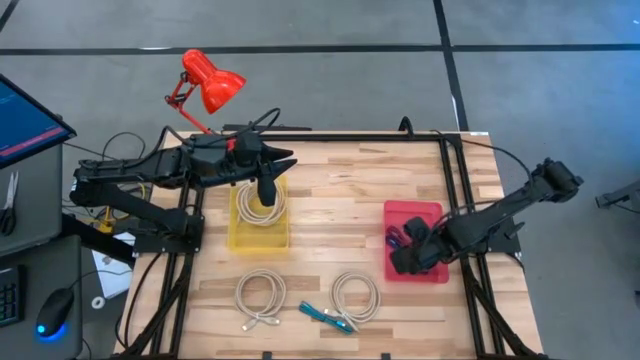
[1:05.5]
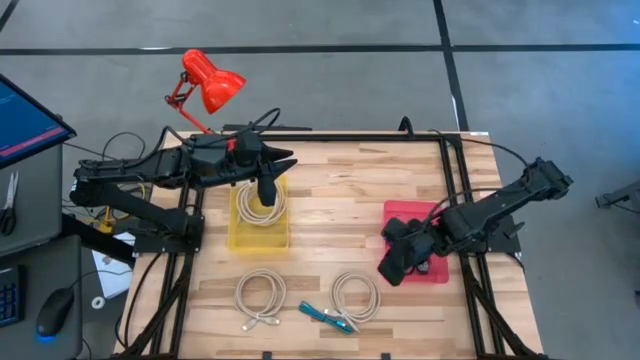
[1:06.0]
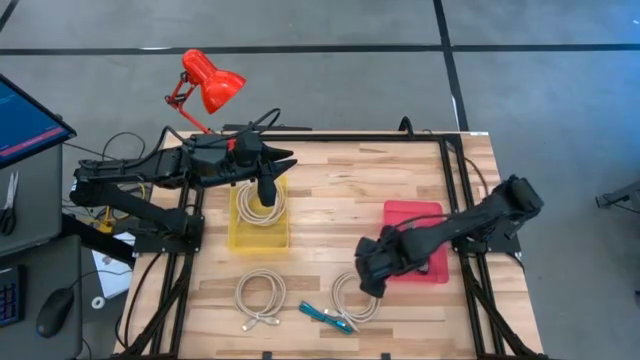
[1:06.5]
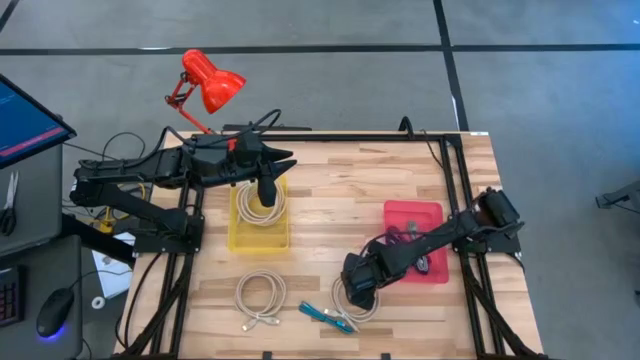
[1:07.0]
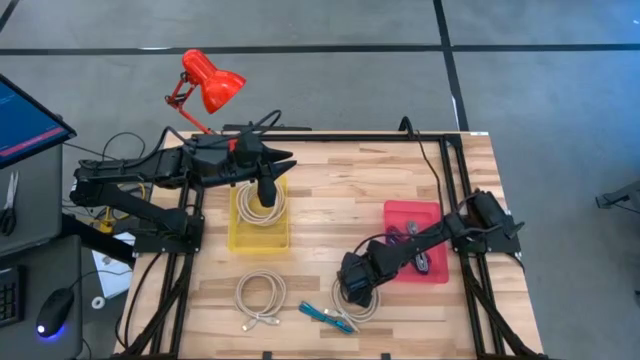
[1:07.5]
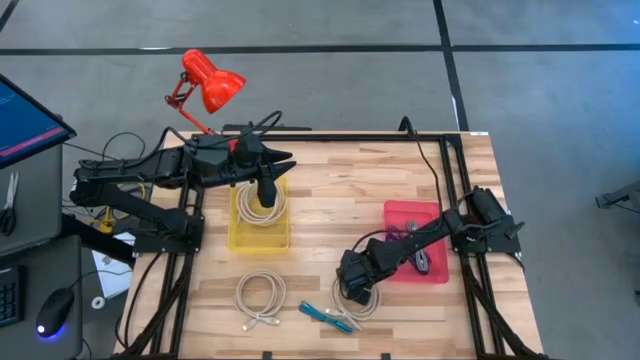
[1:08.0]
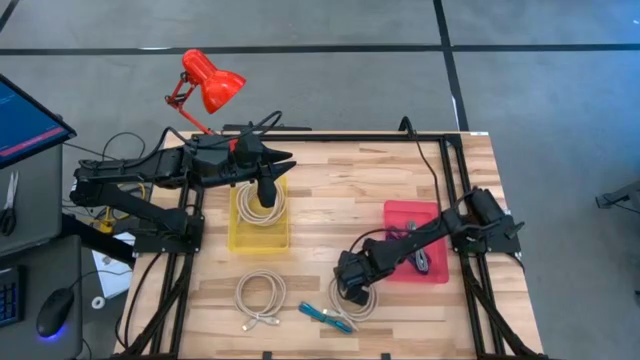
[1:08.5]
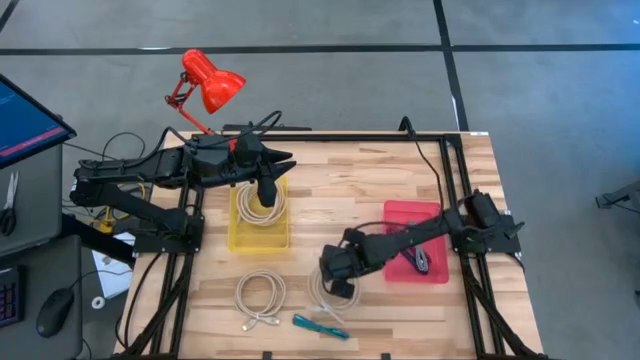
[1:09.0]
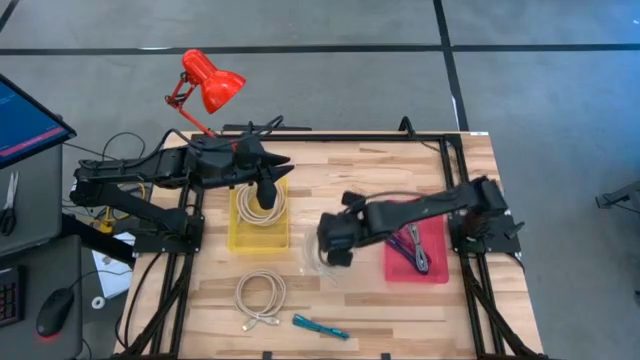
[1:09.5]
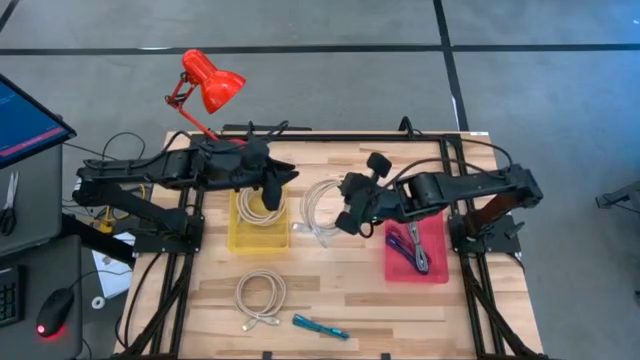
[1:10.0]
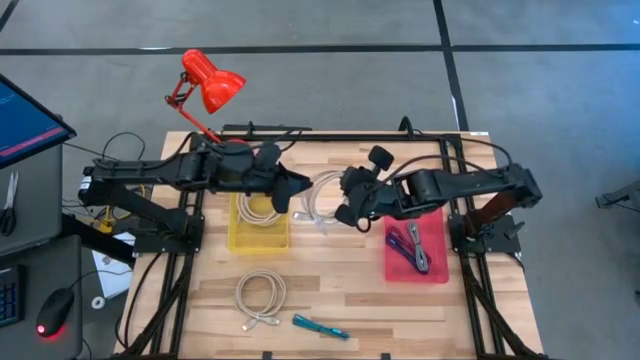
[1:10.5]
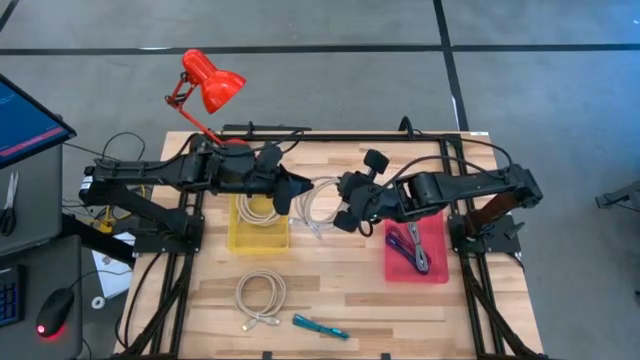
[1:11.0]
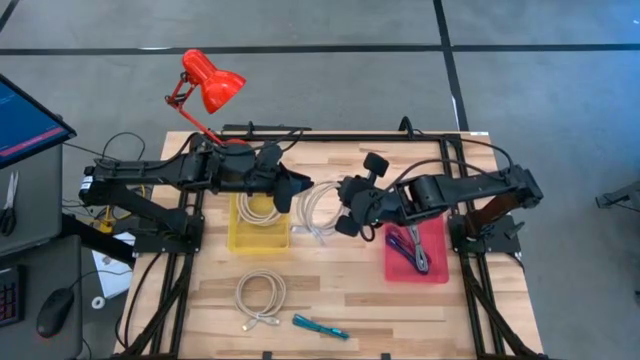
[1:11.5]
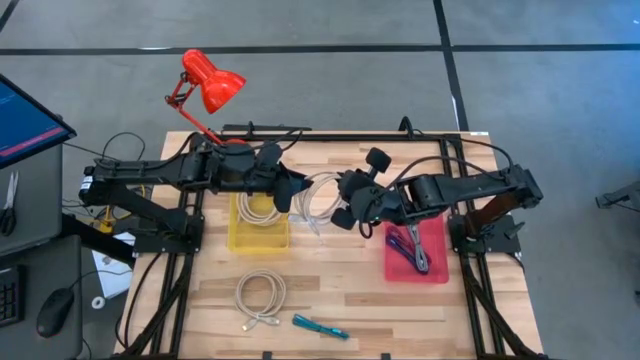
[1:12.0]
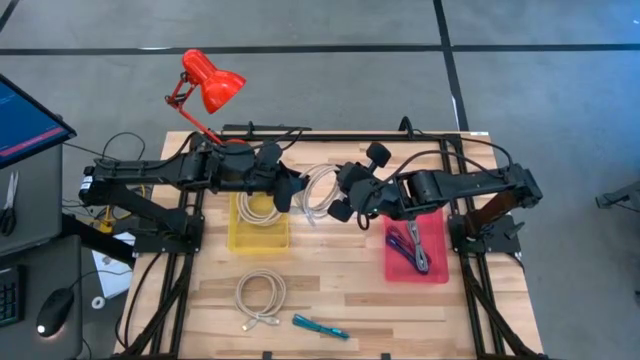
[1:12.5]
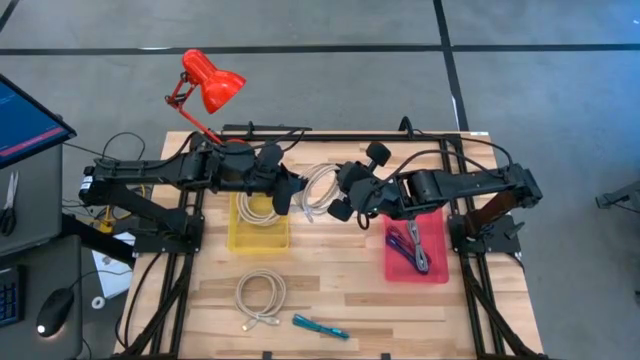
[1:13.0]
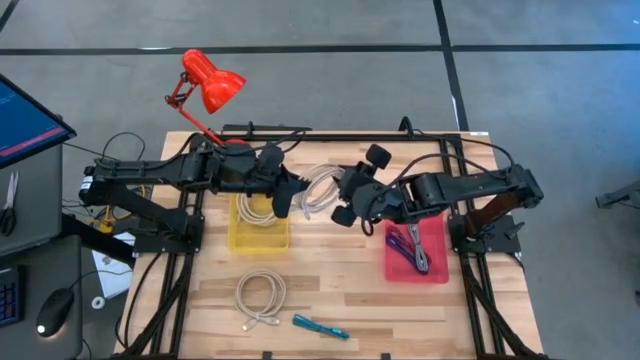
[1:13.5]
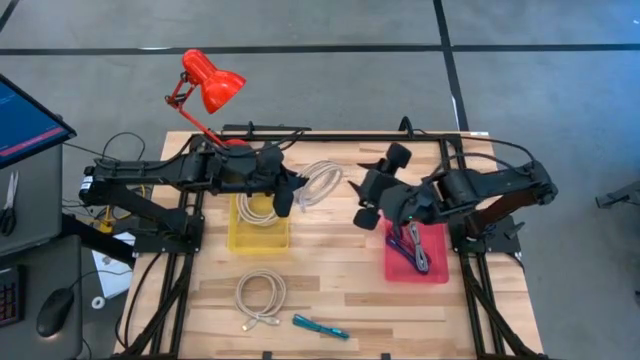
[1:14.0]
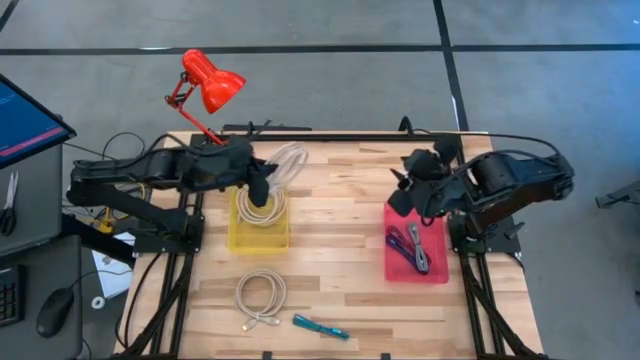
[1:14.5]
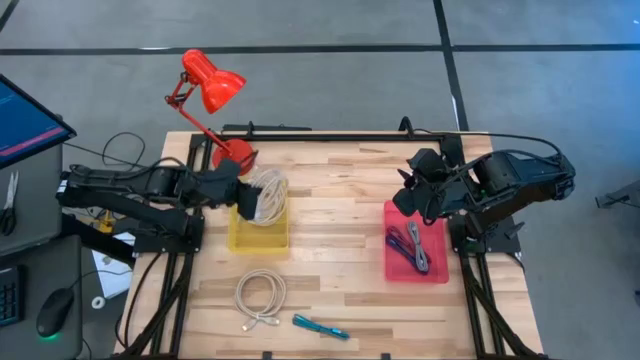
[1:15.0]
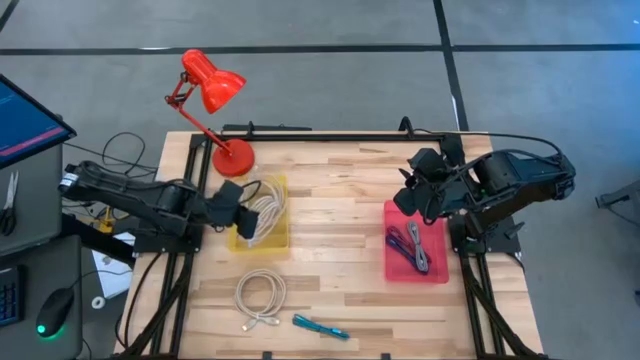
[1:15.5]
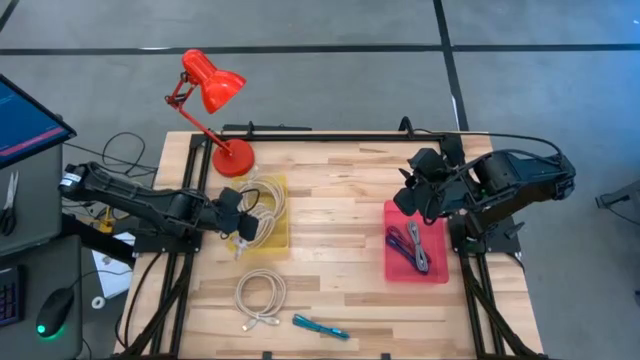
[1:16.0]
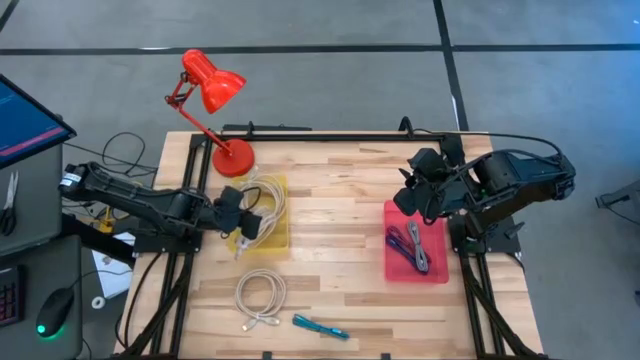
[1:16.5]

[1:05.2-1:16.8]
Task: Pick & Place USB Port
Put the brown HDMI cable into the yellow bin

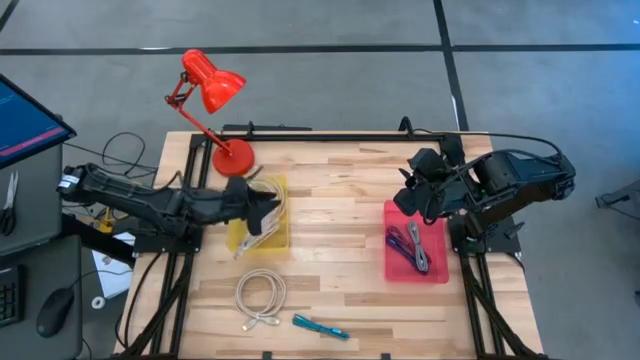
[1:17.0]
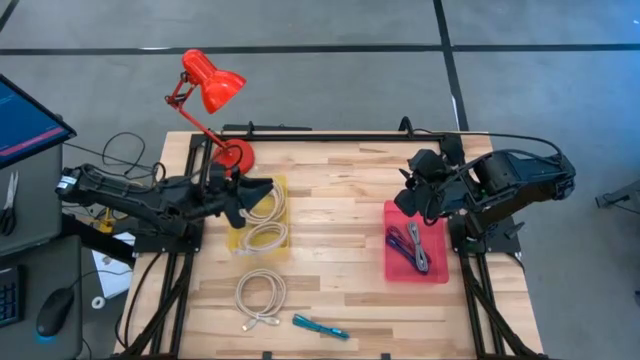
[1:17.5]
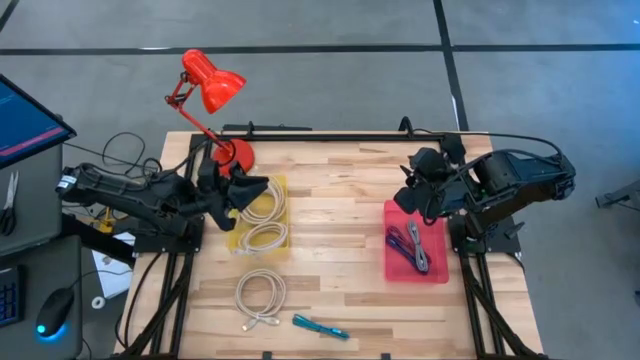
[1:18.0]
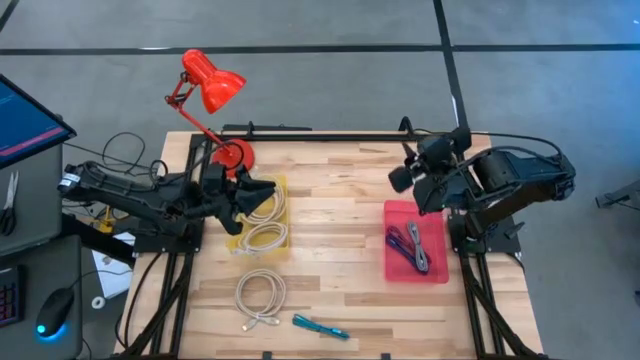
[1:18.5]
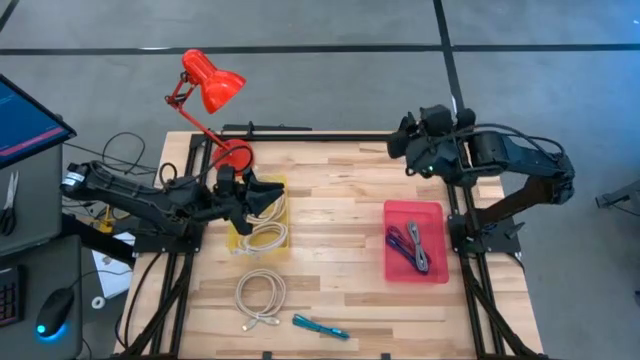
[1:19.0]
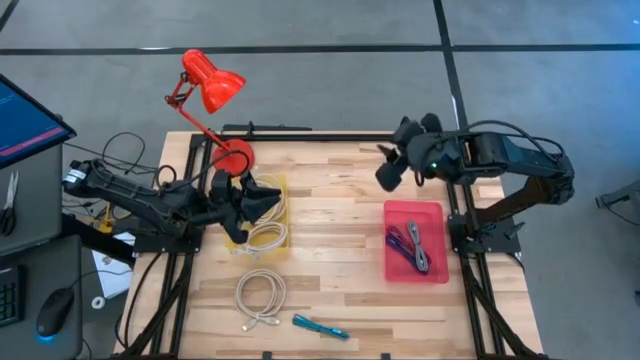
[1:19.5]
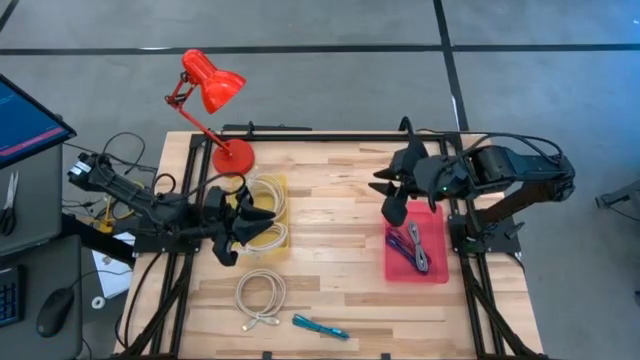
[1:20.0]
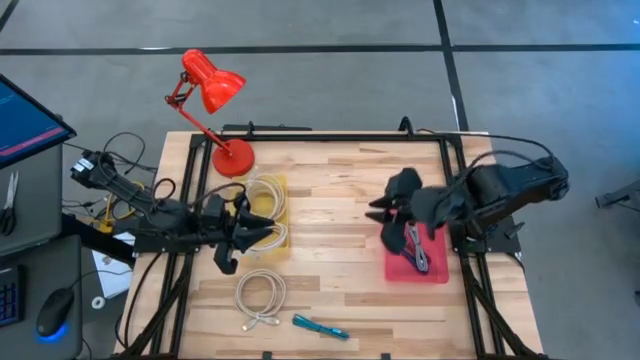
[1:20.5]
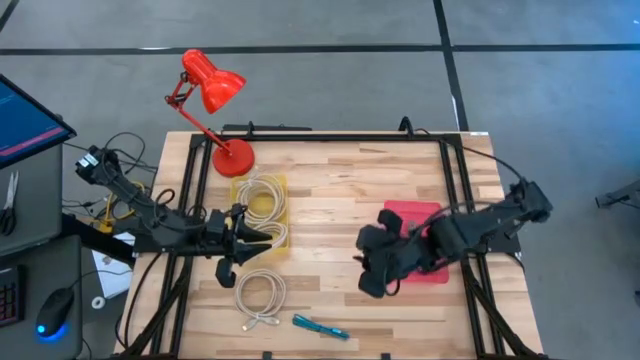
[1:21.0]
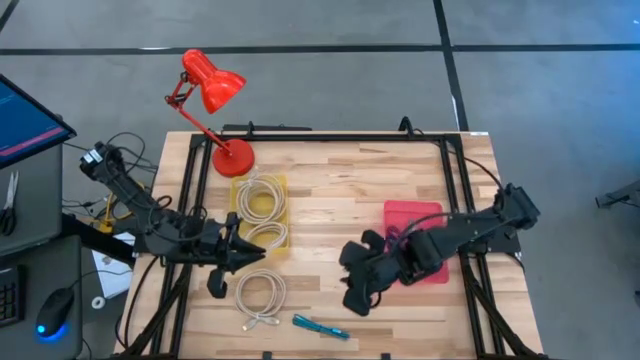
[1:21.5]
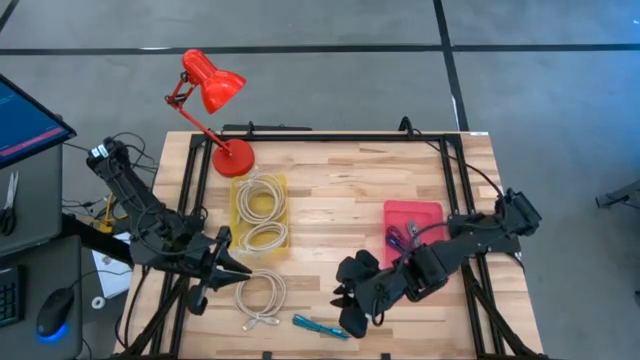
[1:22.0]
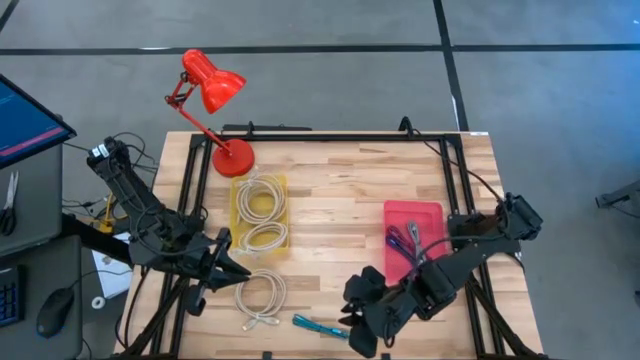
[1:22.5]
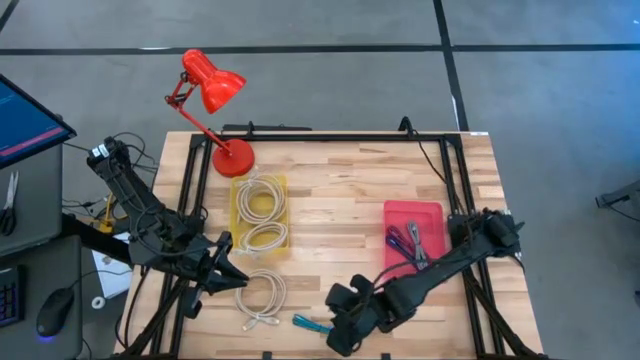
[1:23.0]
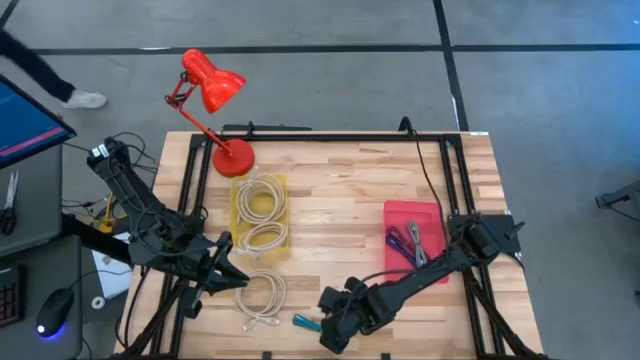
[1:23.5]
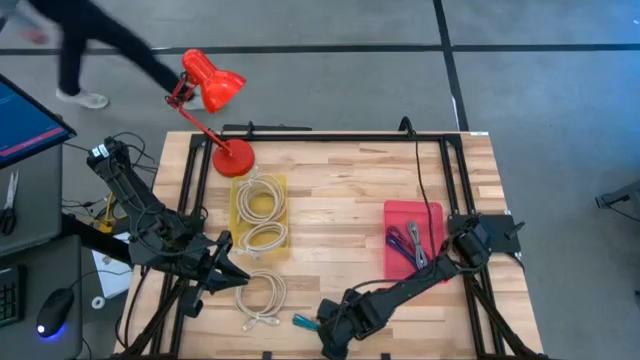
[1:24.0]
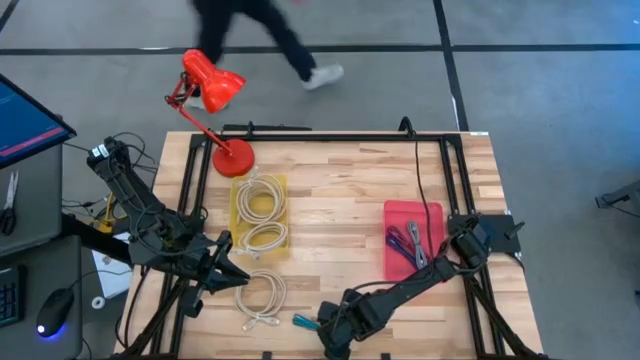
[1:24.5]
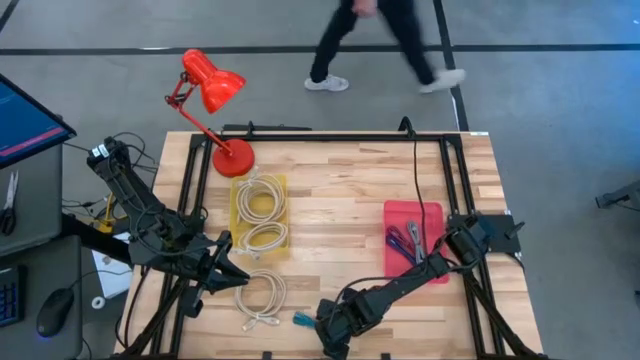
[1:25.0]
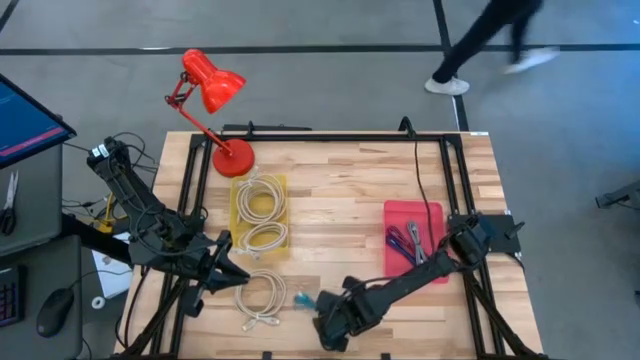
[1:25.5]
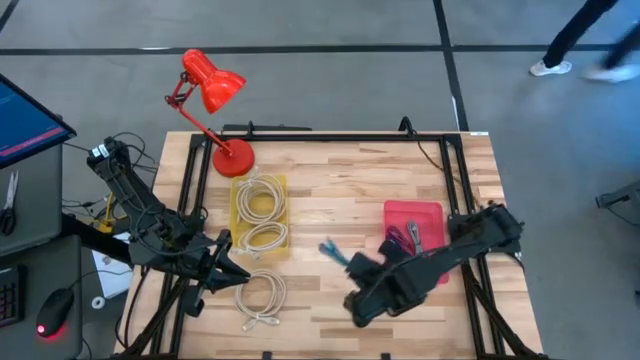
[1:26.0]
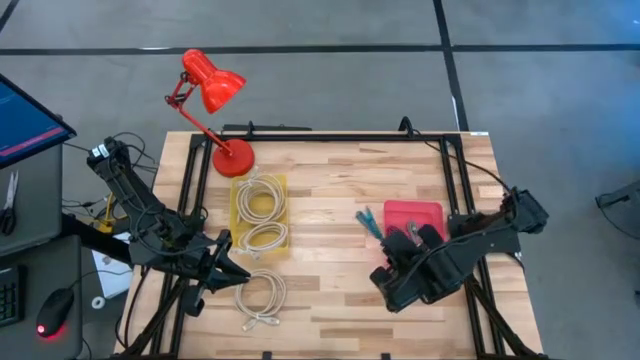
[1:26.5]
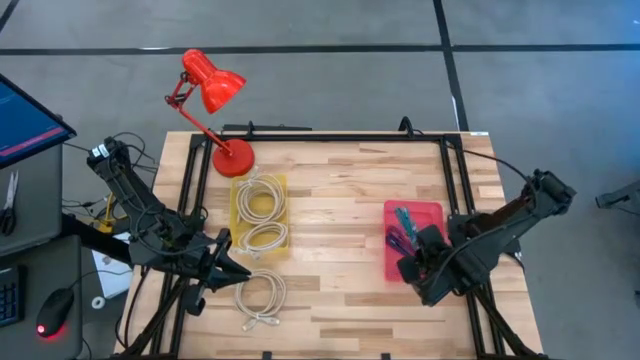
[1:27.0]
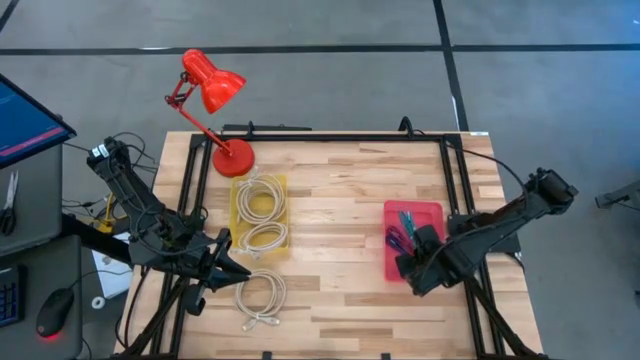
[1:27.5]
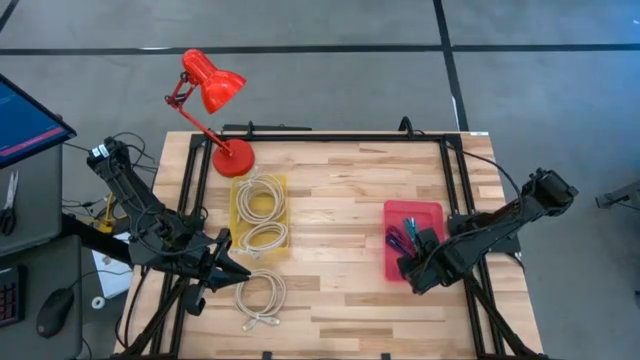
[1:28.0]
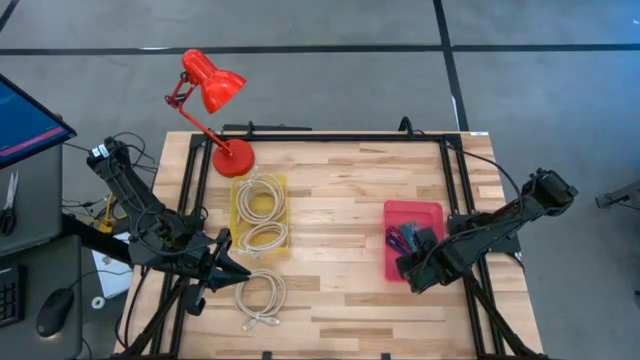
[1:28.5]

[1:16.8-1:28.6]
Put the black and blue charger cable into the pink bin
